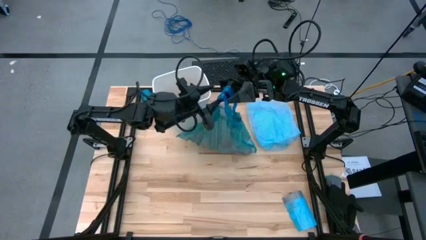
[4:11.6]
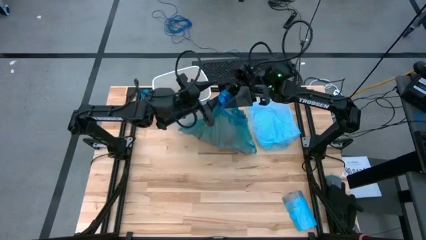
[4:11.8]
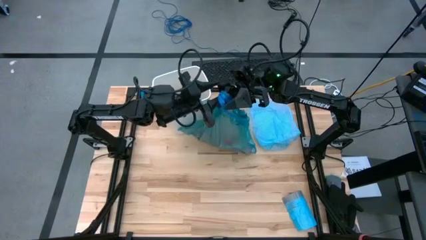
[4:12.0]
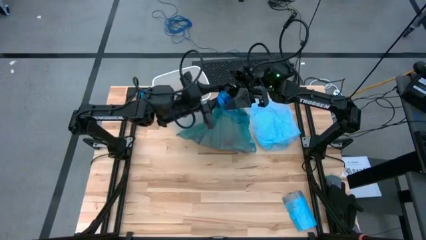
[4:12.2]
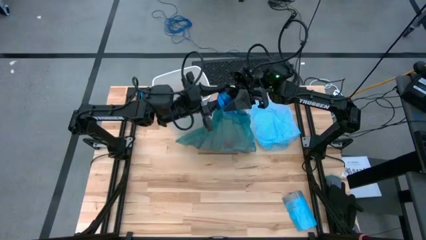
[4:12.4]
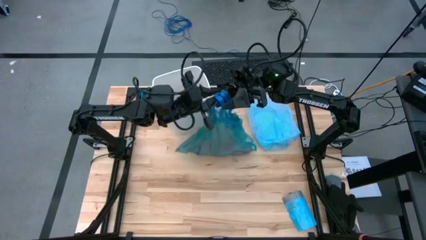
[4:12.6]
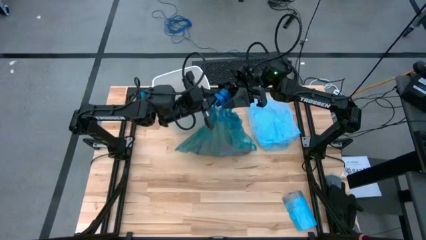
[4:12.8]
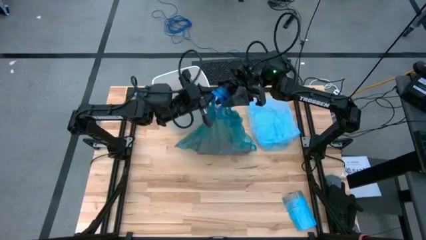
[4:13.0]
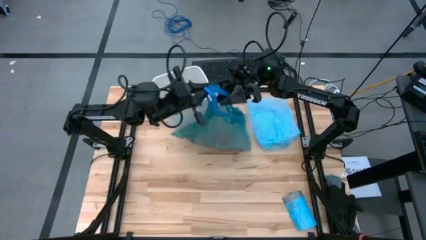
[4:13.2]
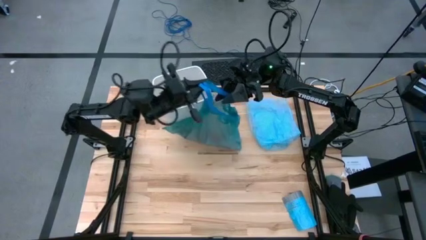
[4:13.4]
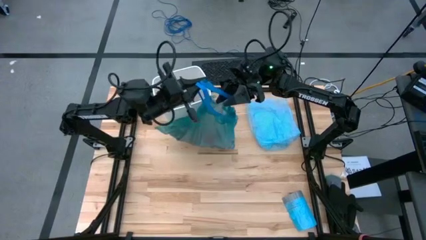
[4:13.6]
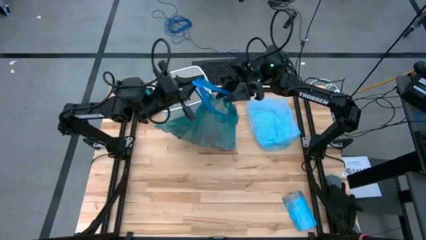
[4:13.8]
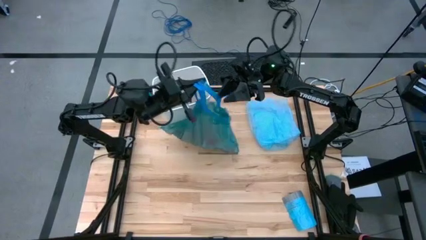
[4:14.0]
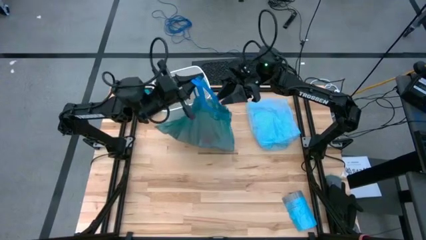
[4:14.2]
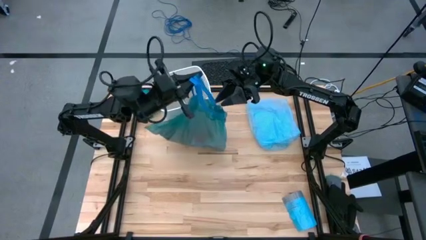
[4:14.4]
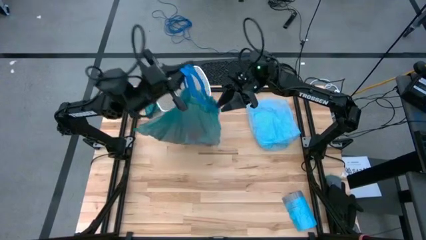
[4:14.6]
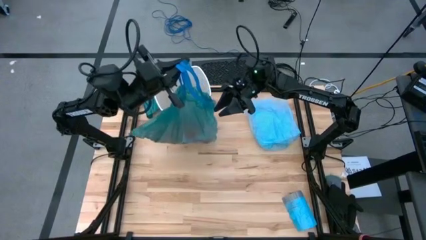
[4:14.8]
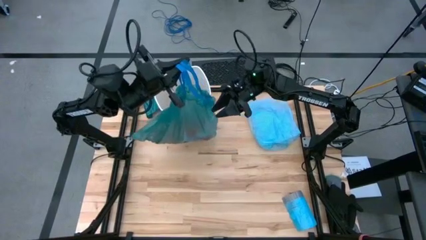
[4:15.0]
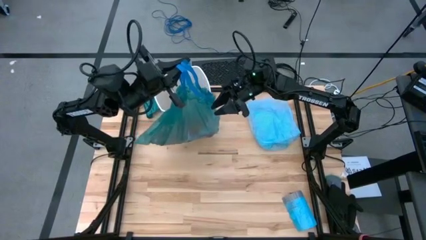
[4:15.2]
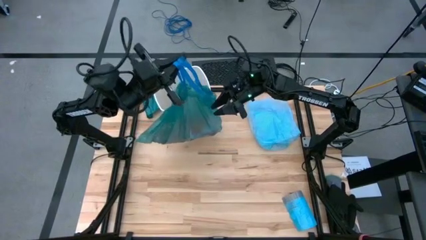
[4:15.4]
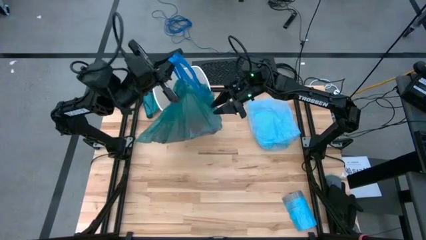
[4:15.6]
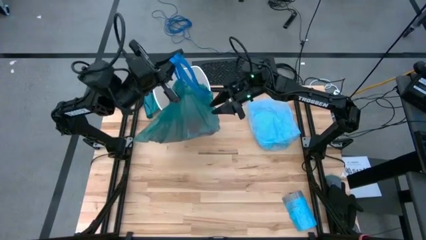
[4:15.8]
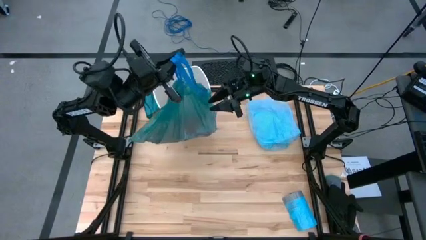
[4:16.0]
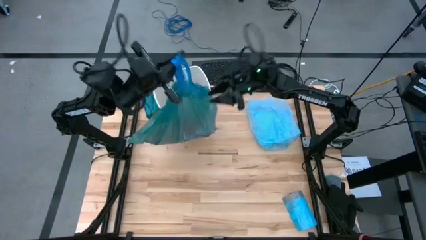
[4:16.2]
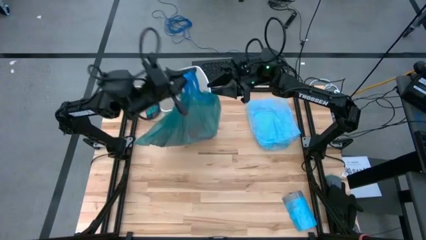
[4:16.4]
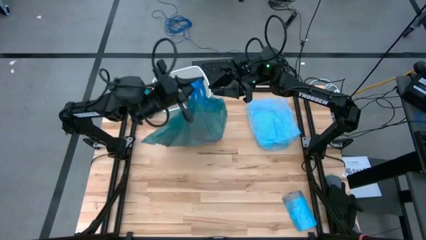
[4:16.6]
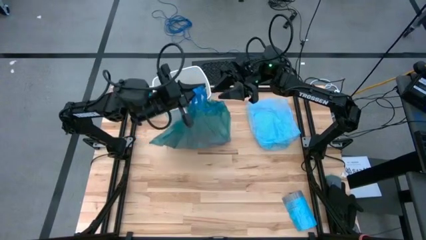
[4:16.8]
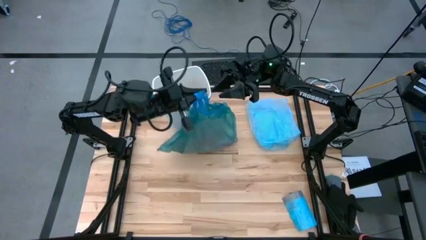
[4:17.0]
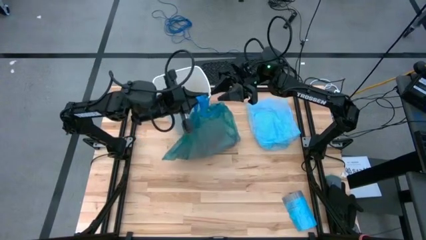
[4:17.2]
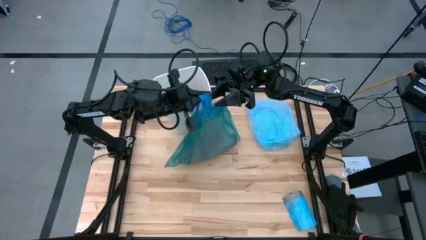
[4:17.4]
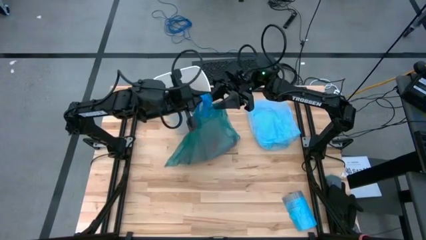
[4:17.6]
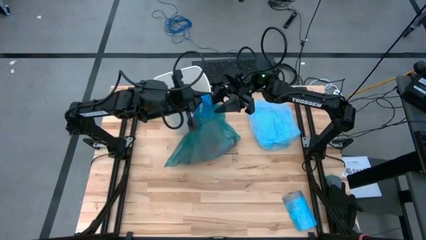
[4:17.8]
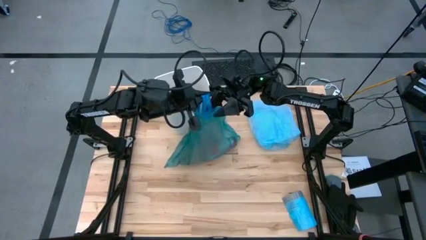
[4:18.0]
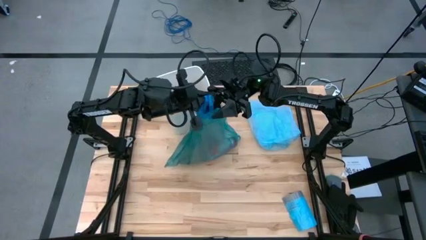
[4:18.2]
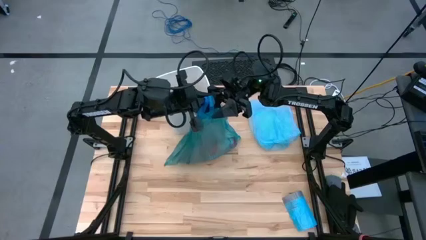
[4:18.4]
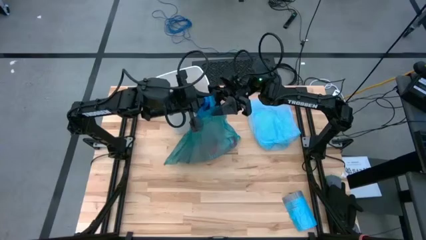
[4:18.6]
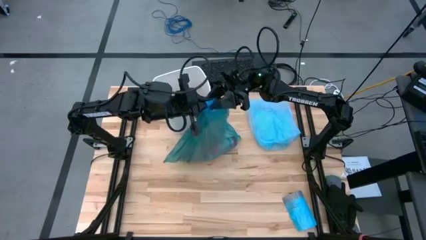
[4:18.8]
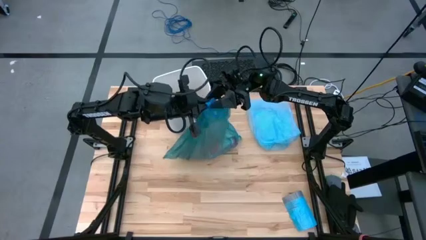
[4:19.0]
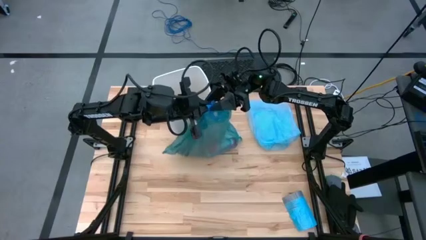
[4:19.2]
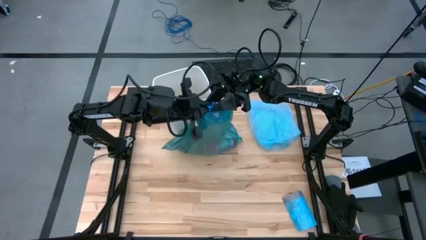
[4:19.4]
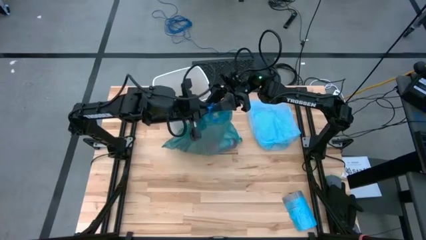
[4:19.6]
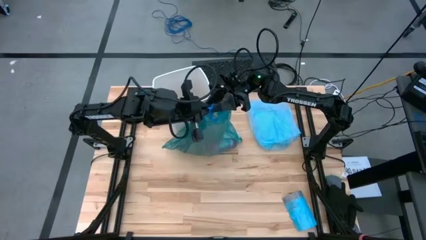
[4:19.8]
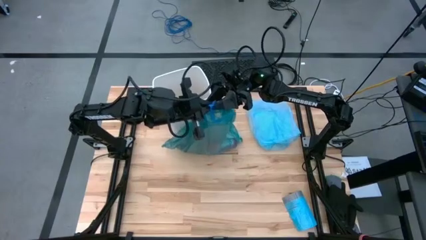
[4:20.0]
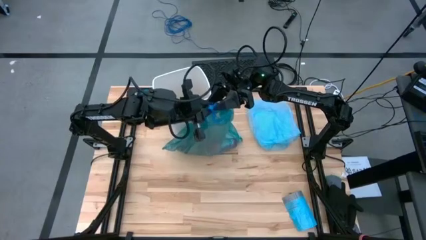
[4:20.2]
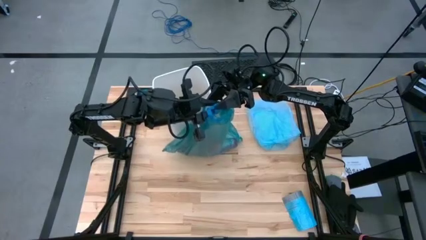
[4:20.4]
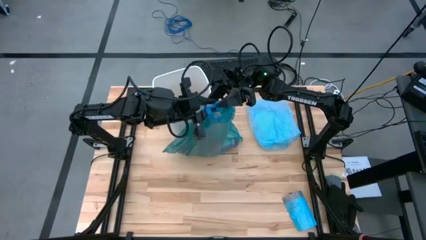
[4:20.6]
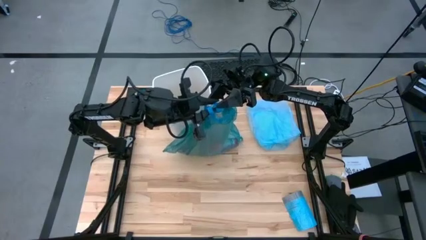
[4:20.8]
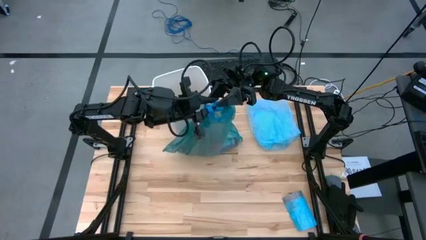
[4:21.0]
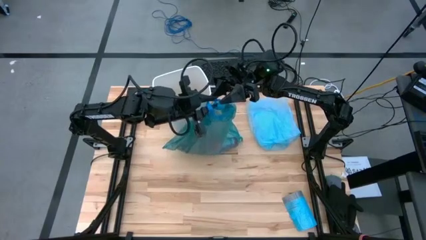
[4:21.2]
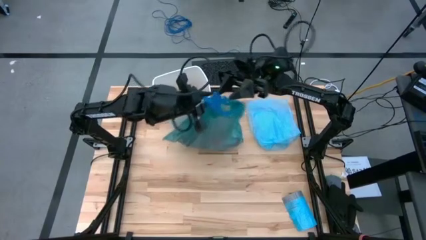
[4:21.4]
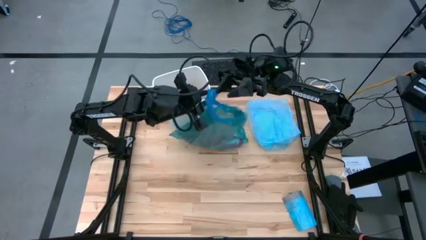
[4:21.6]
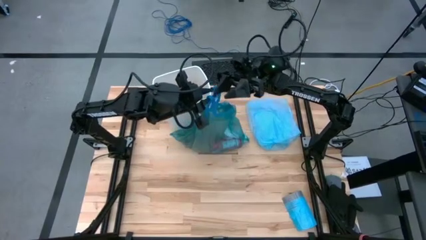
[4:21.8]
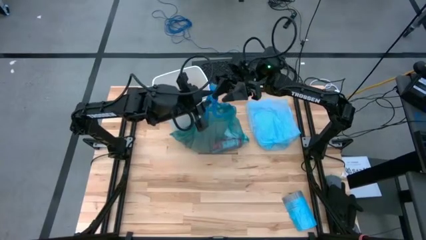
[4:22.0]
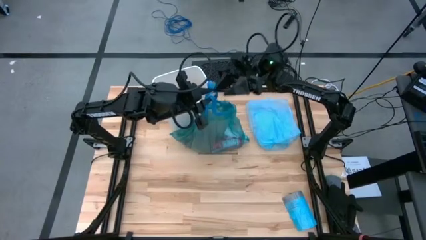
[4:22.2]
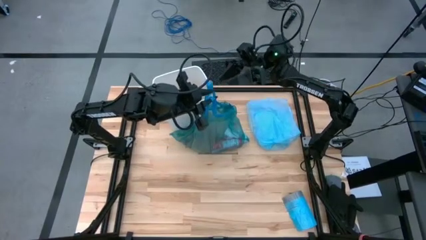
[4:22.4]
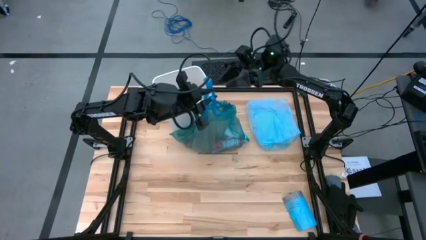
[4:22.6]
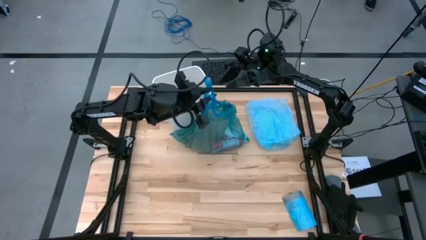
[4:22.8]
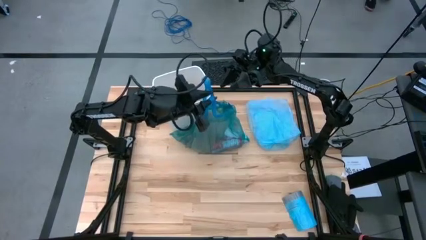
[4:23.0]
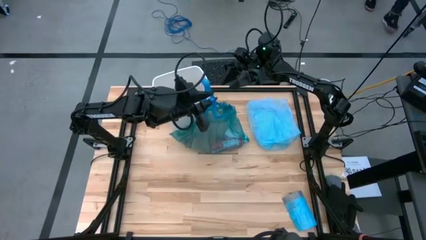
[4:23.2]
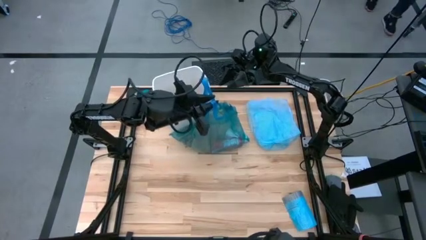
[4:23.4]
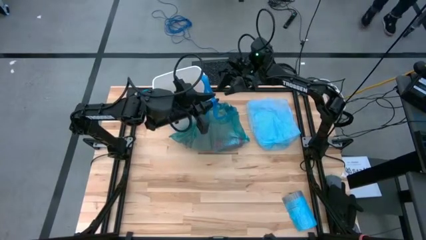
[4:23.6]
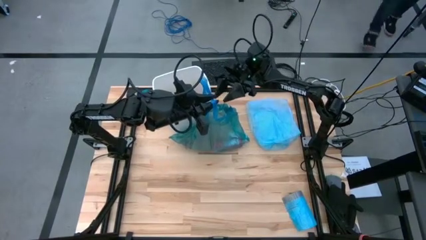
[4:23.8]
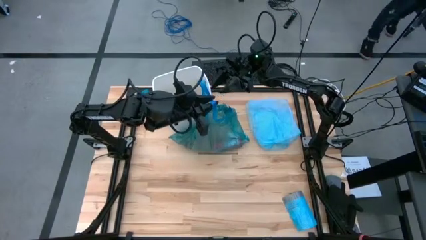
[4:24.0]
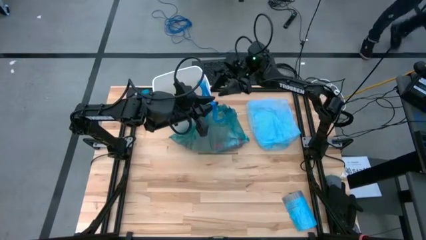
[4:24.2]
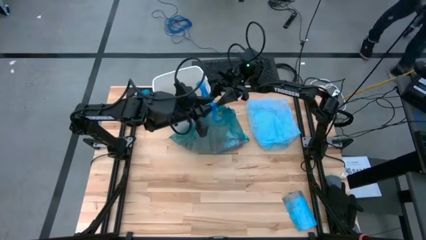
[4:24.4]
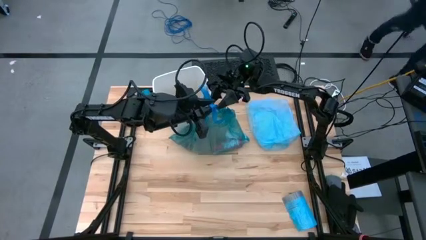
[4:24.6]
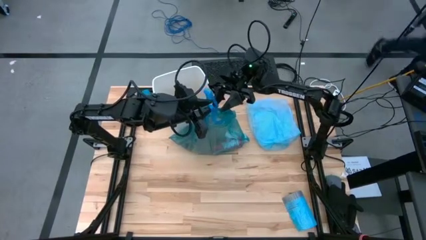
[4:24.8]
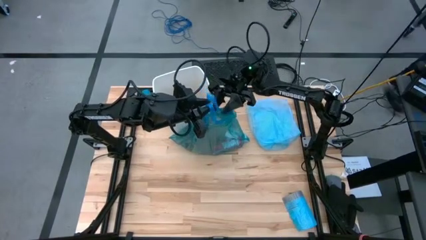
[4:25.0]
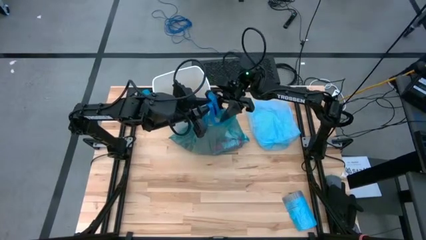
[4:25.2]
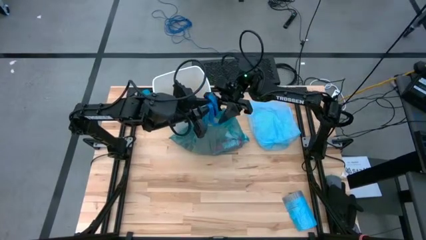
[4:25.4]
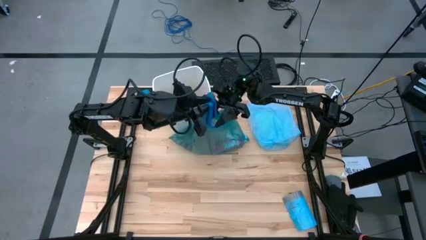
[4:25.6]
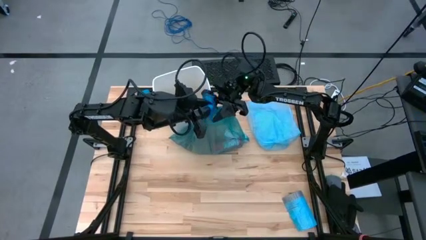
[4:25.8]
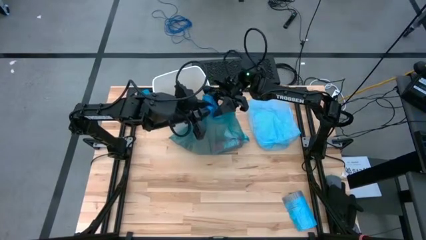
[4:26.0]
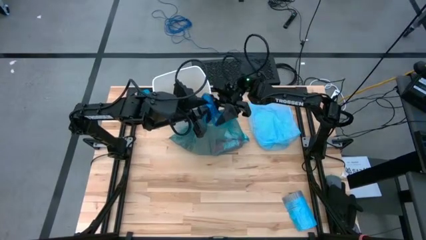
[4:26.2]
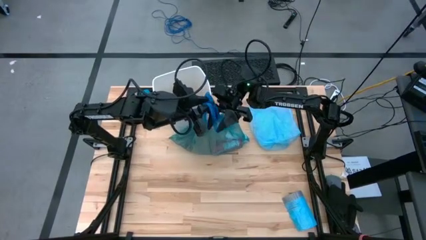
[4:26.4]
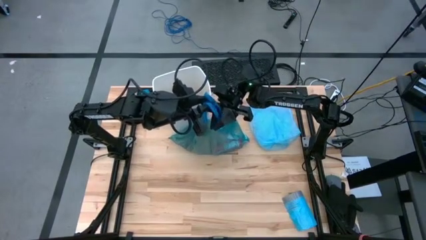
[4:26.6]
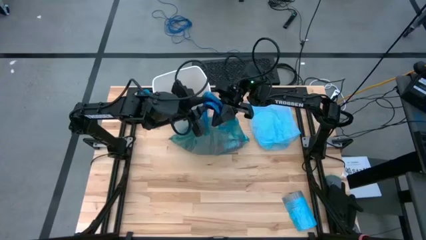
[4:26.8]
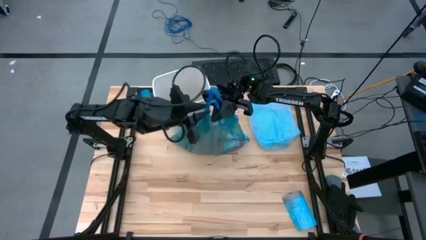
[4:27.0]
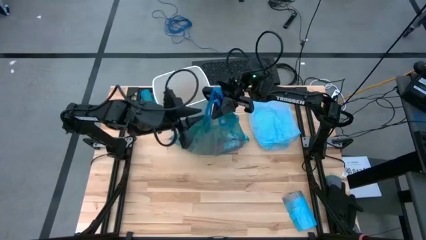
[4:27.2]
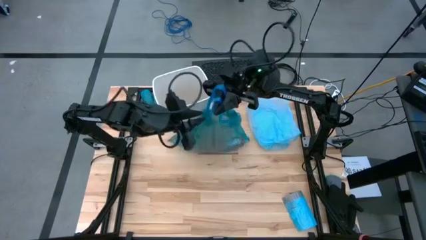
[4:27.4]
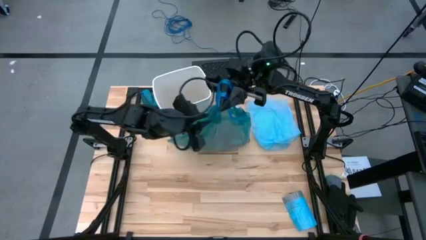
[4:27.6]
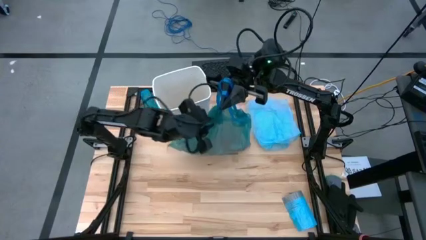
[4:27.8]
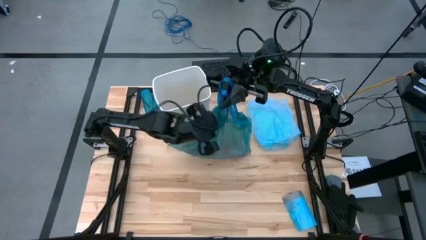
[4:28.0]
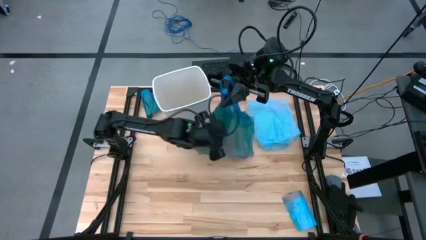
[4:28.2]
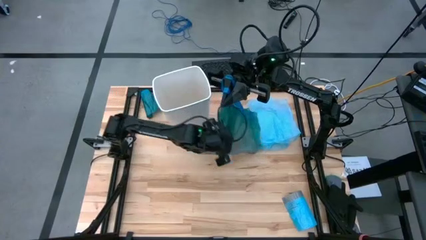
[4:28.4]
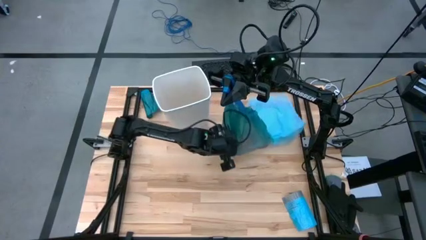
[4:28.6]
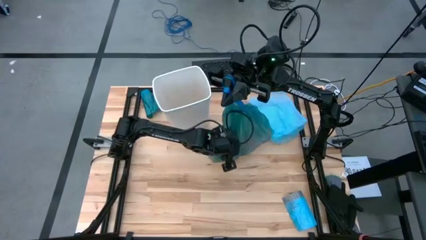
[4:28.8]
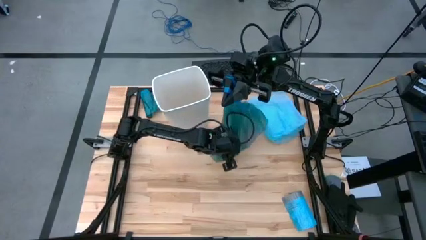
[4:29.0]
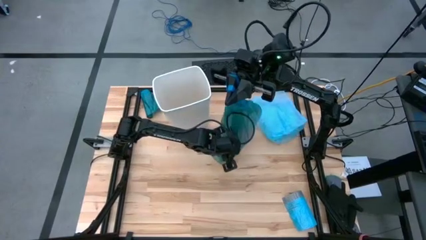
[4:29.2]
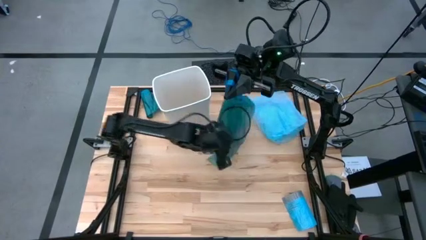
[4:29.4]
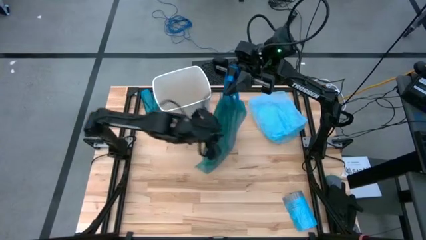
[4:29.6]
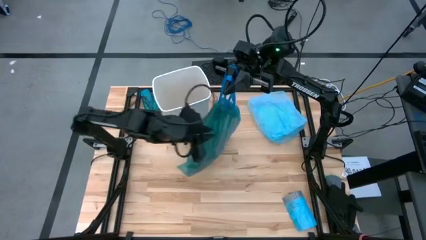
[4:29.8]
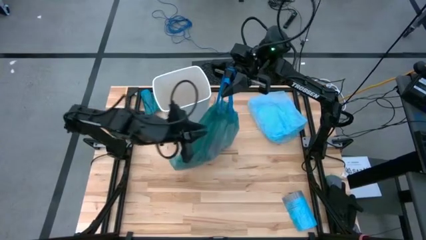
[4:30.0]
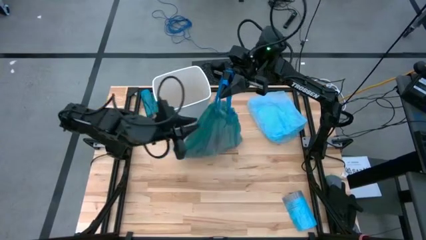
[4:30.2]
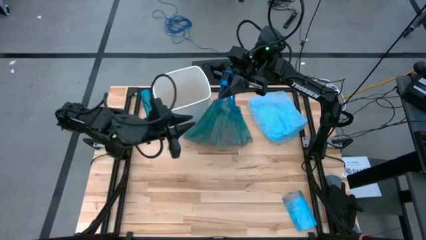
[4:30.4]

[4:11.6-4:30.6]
Task: place trash/remove bag and relplace
Close the blue trash bag
